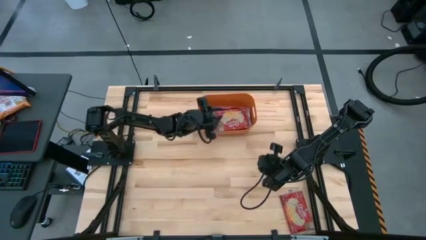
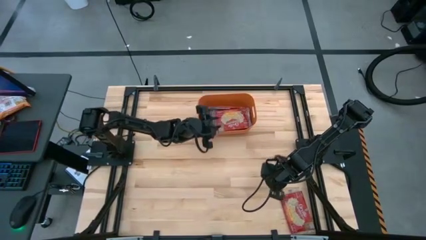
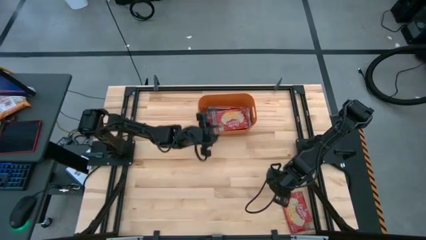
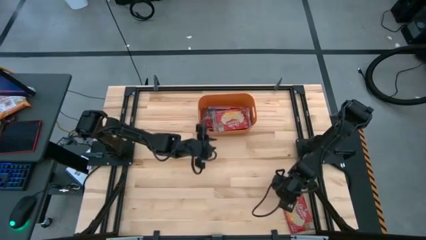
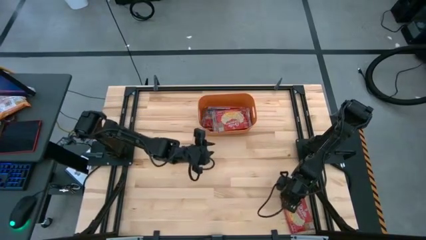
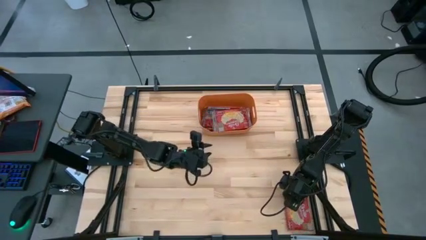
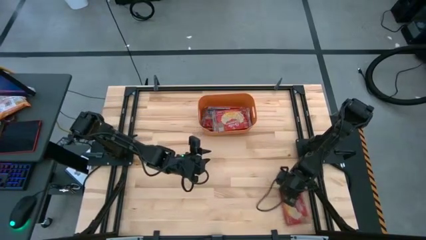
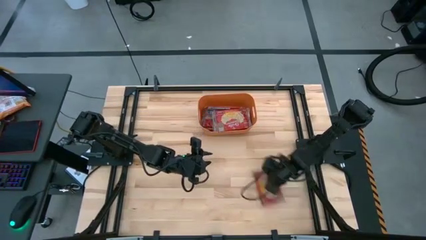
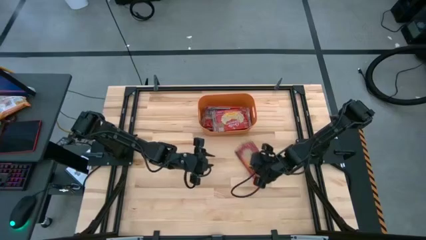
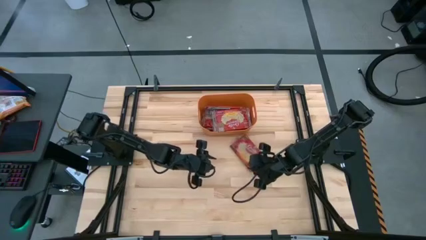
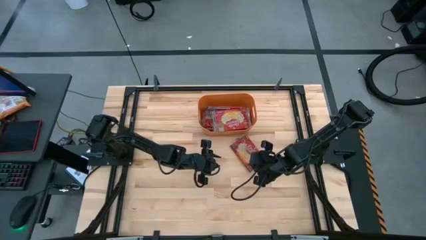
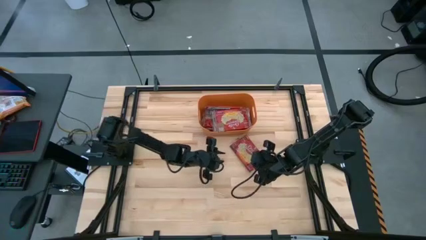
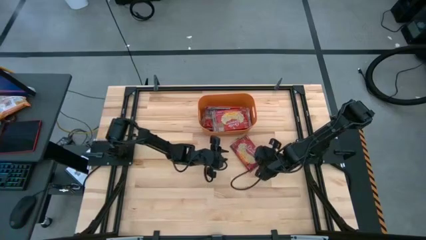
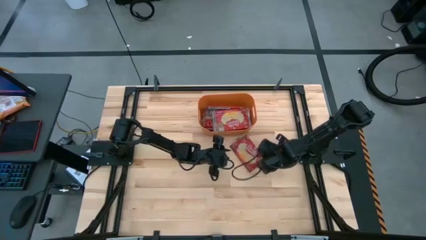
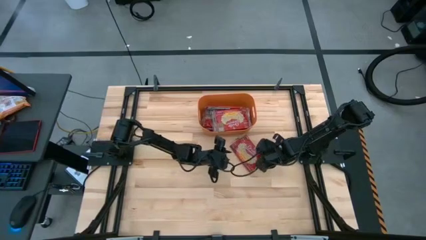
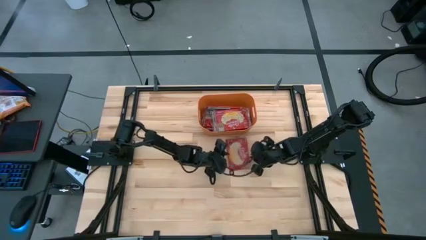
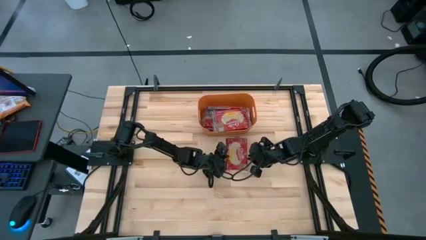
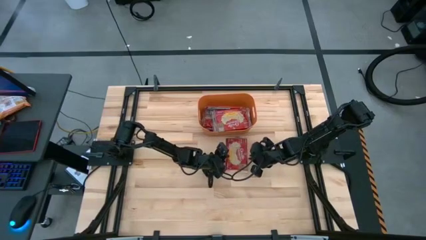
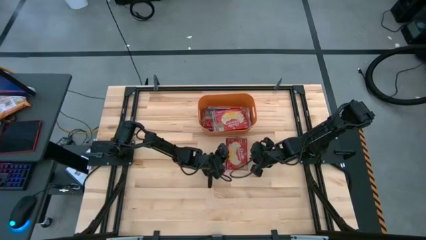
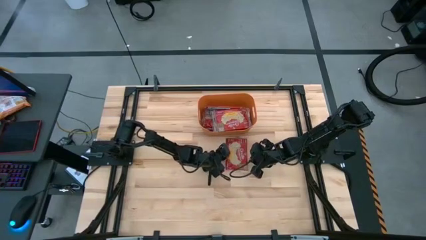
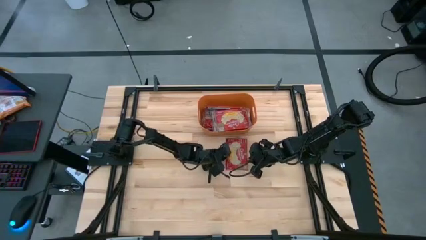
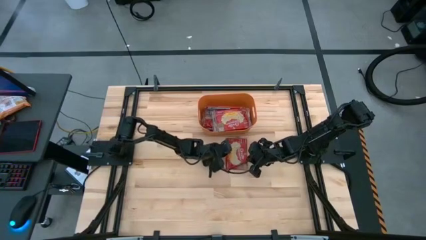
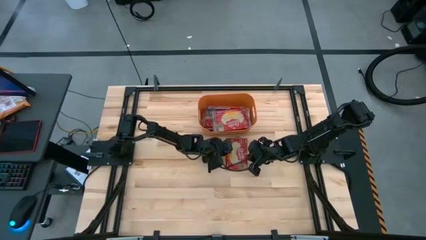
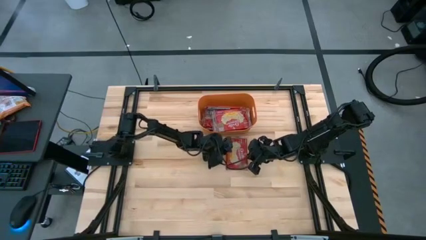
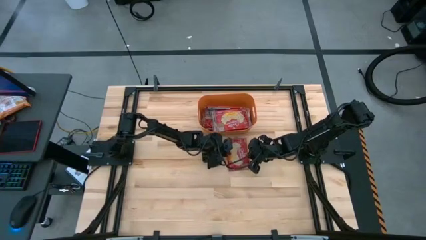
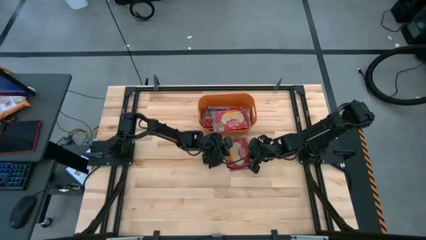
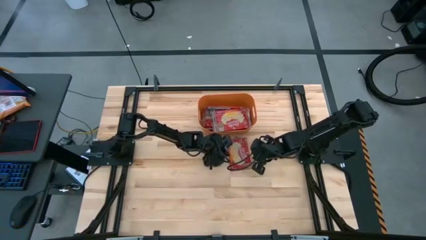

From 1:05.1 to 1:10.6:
Task: Sort popcorn bags into baskets
Put the red popcorn bag into the orange bin

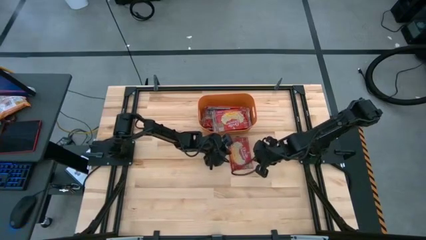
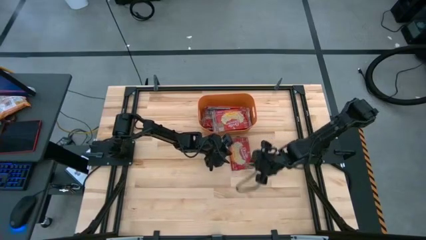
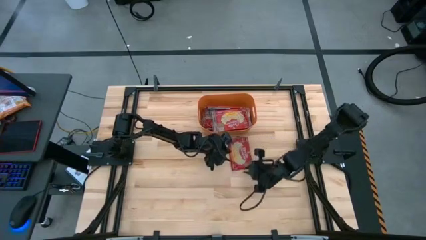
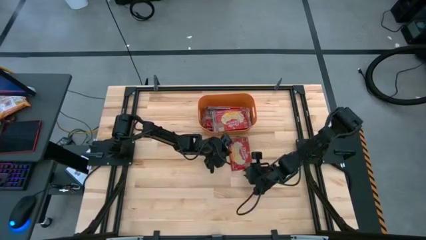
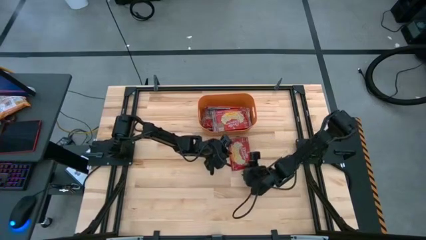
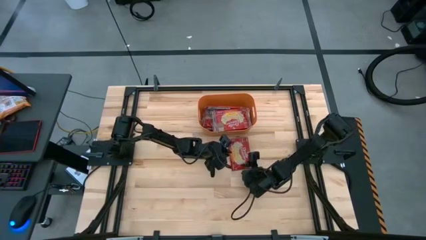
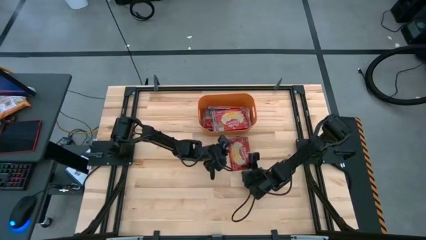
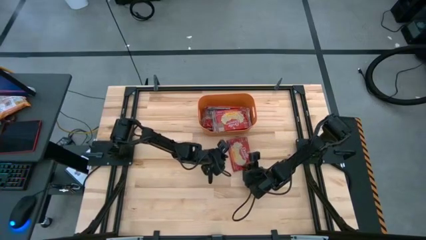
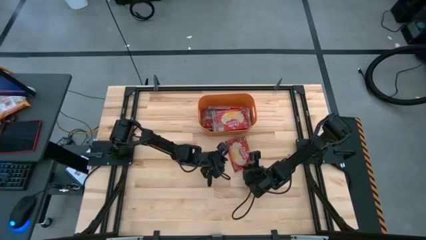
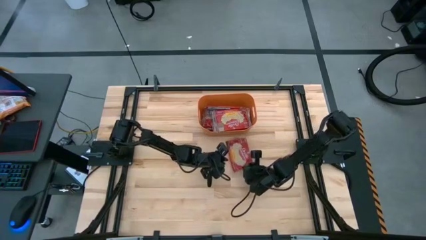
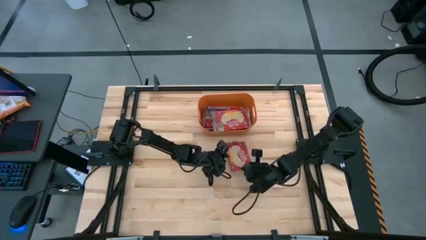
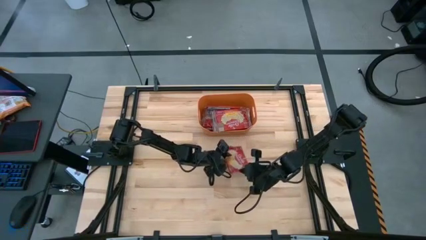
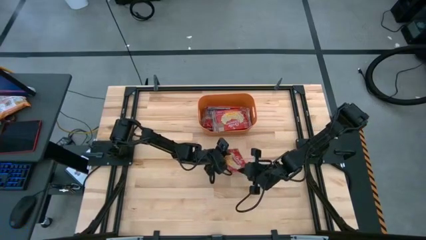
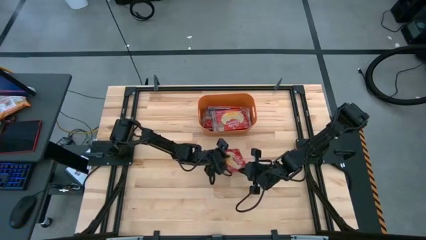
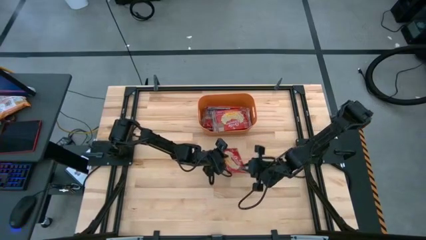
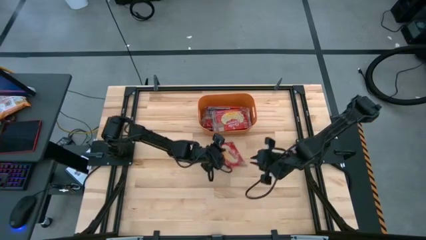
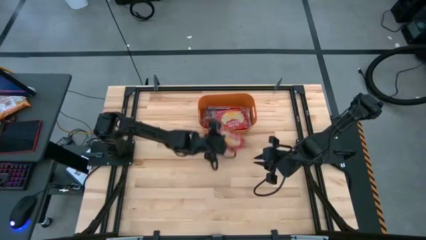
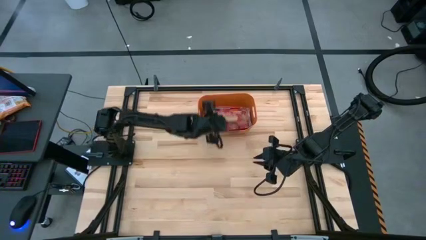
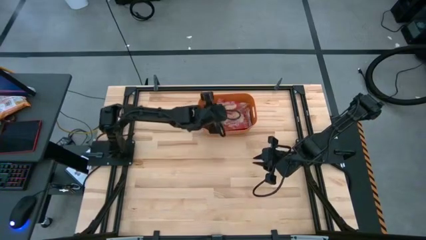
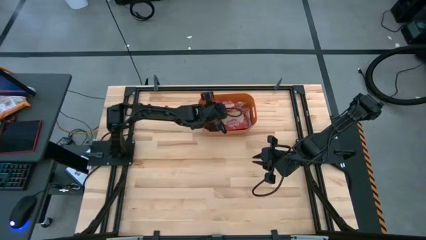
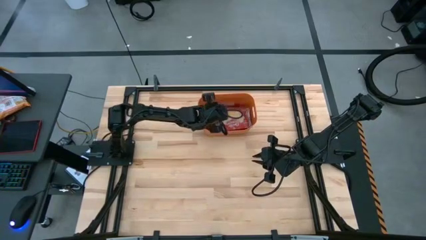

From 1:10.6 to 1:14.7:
Put the red popcorn bag into the orange bin

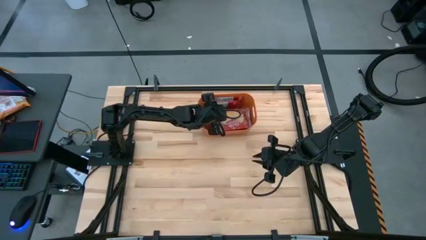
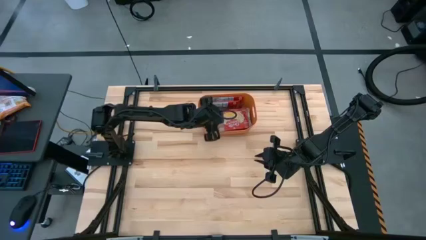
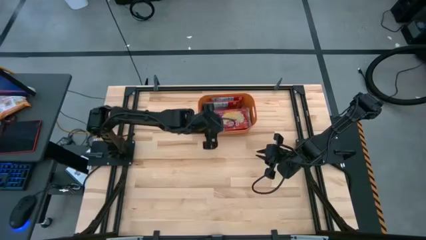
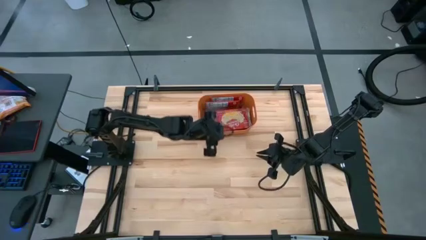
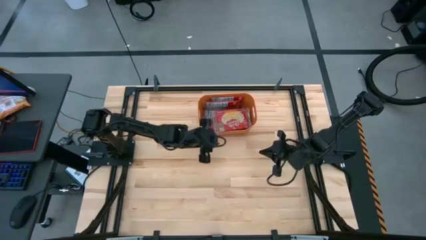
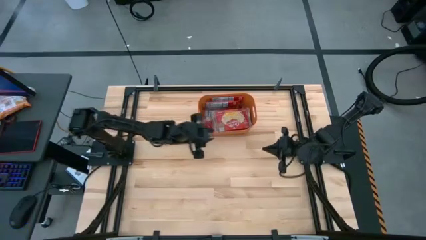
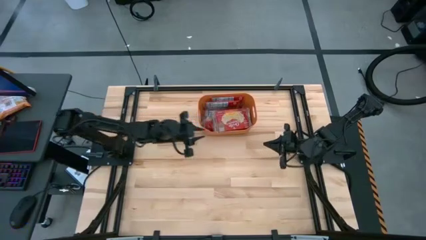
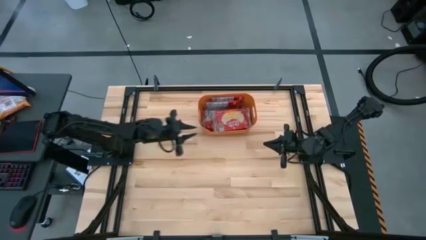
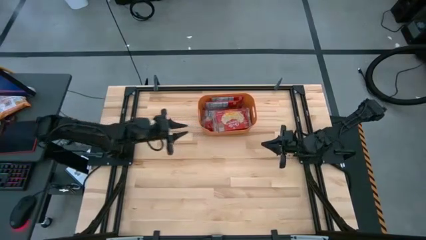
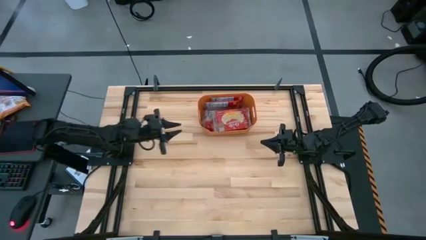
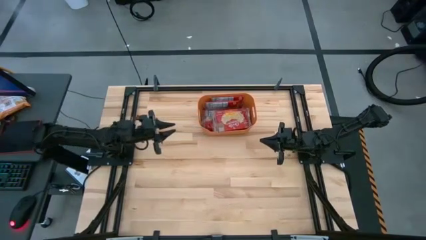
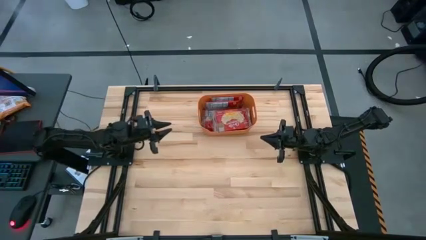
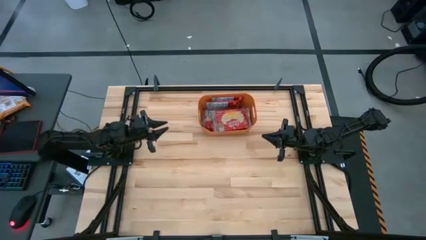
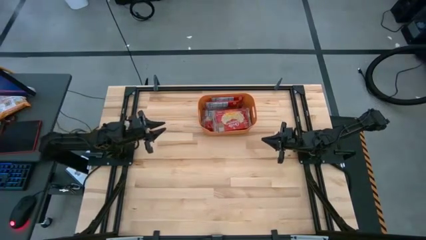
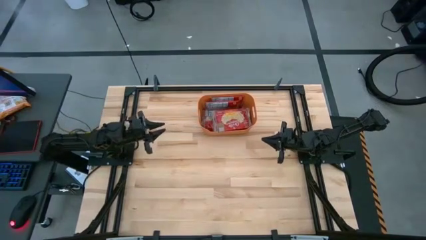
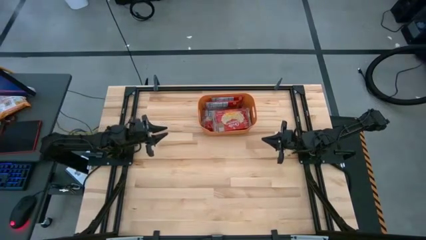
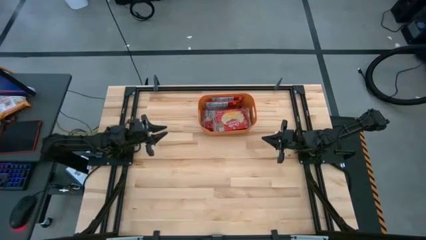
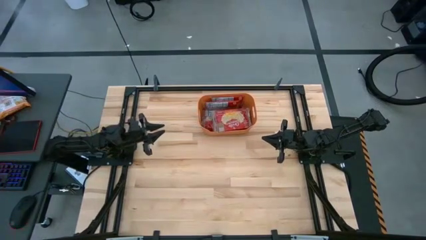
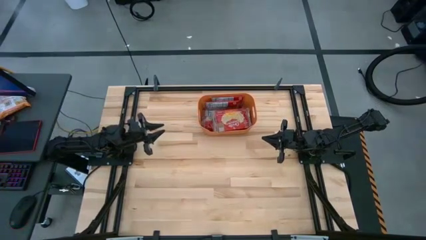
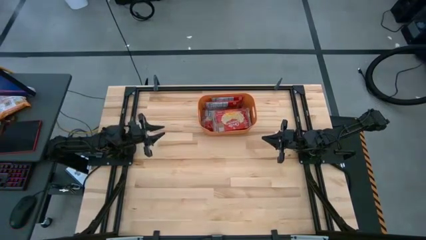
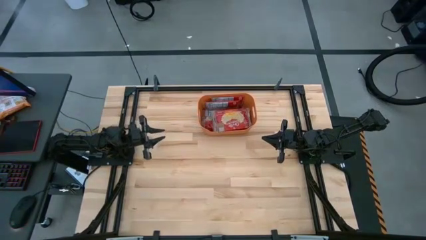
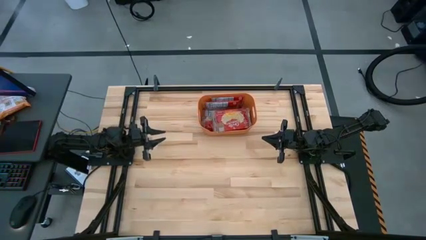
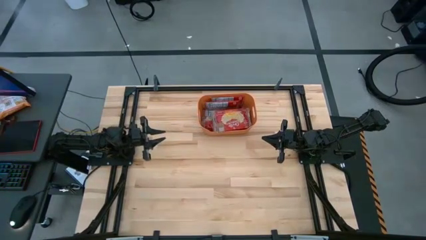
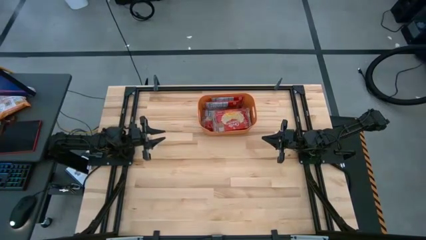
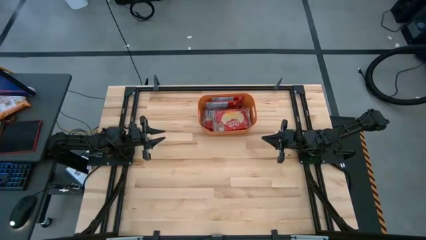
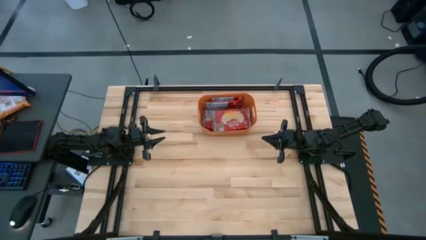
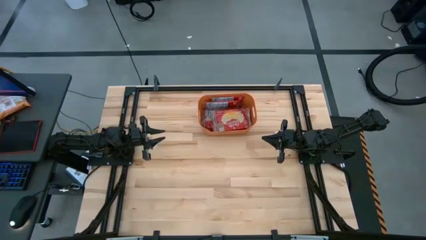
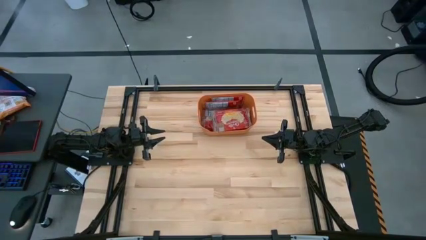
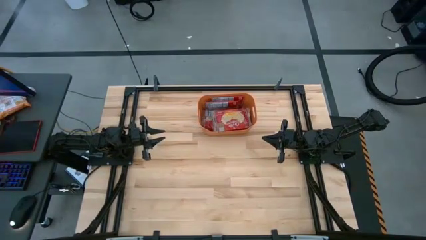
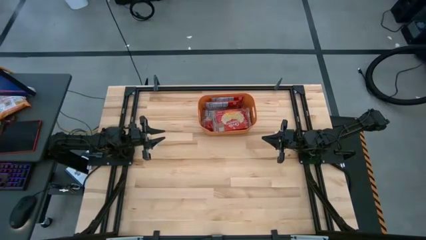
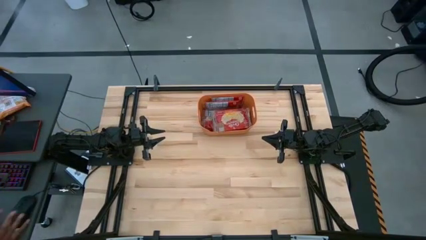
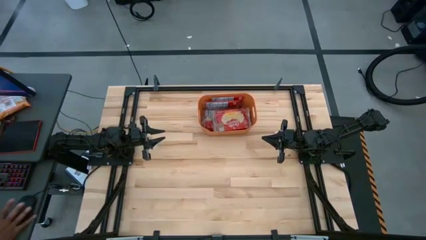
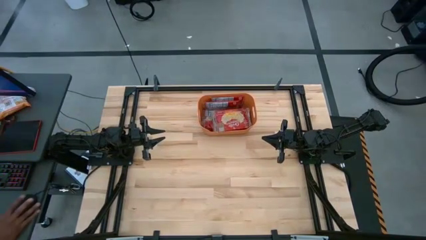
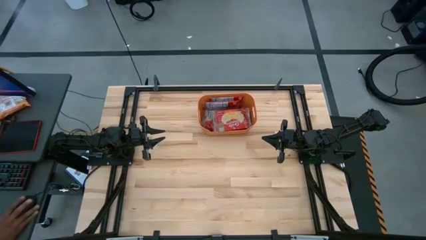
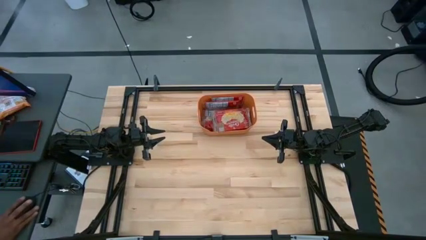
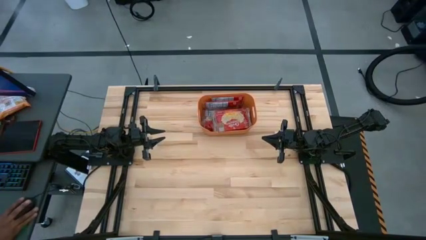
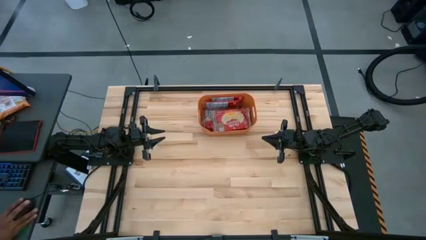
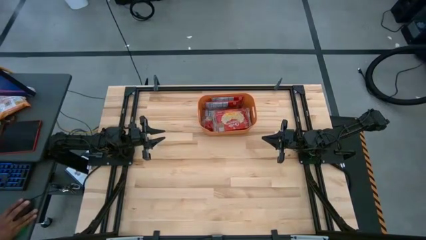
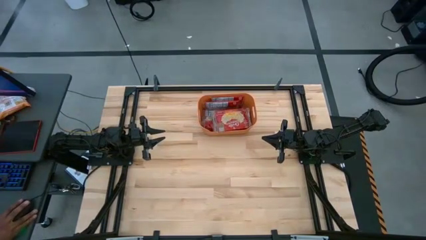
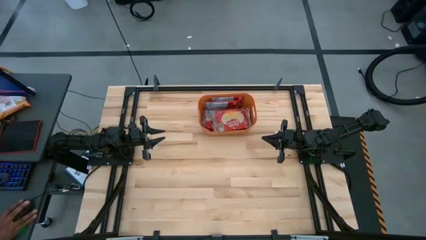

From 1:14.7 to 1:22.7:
Return to Home Position
